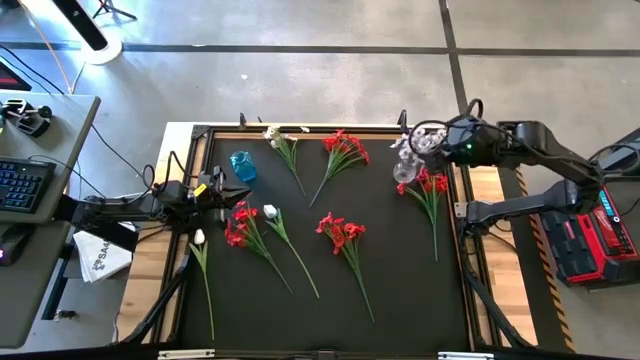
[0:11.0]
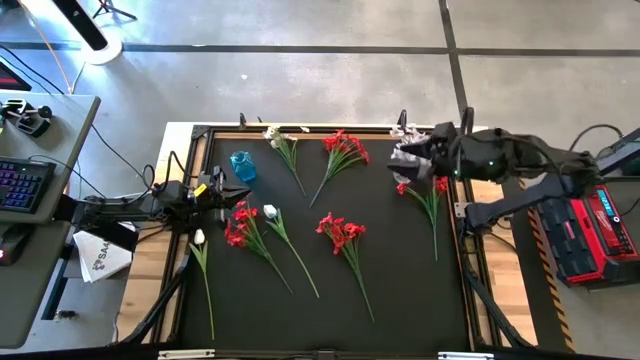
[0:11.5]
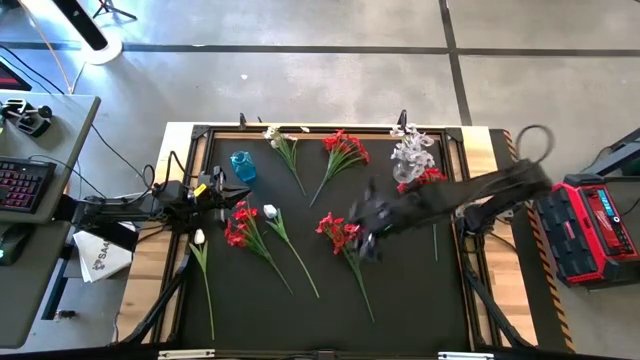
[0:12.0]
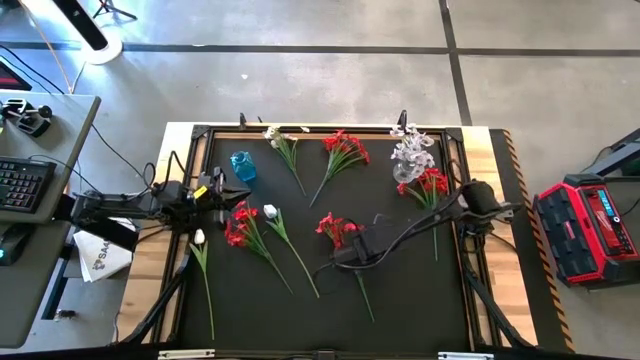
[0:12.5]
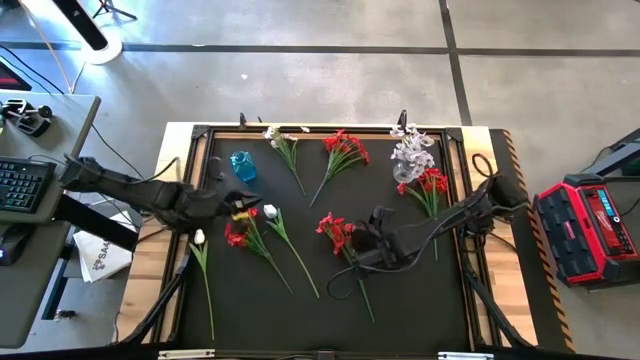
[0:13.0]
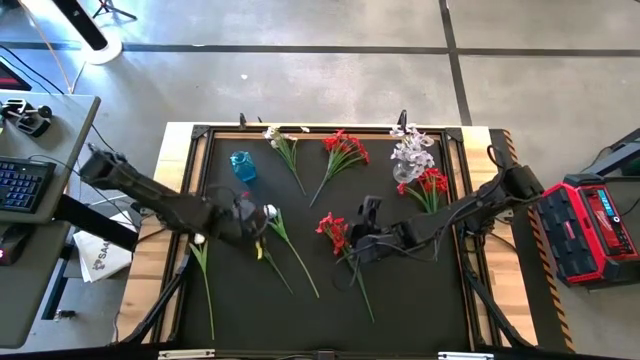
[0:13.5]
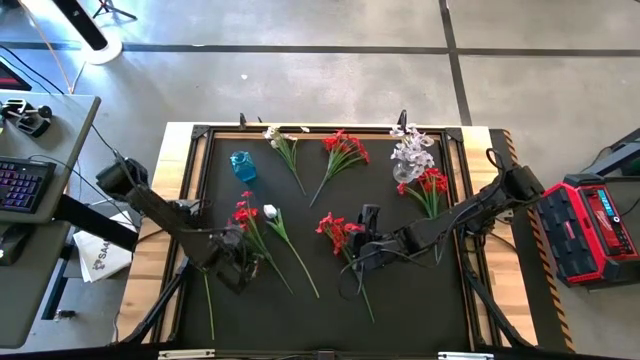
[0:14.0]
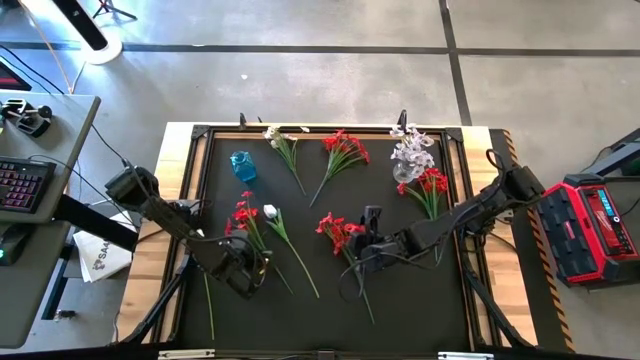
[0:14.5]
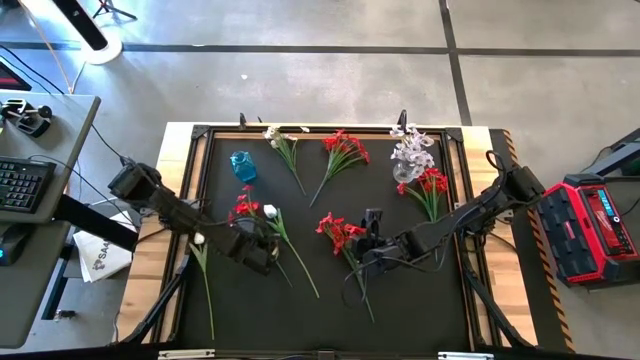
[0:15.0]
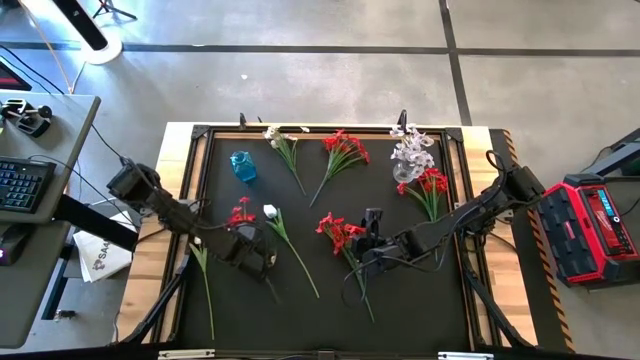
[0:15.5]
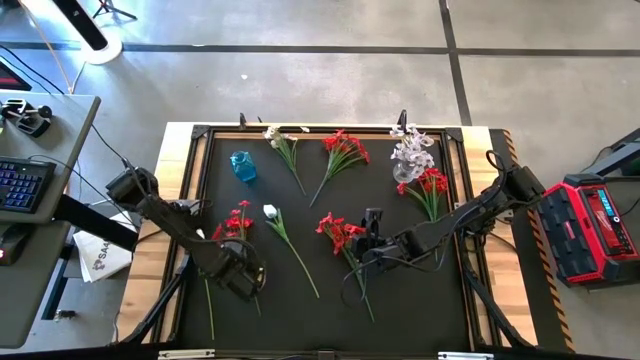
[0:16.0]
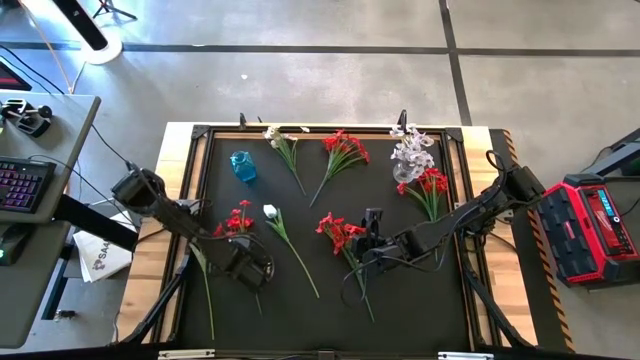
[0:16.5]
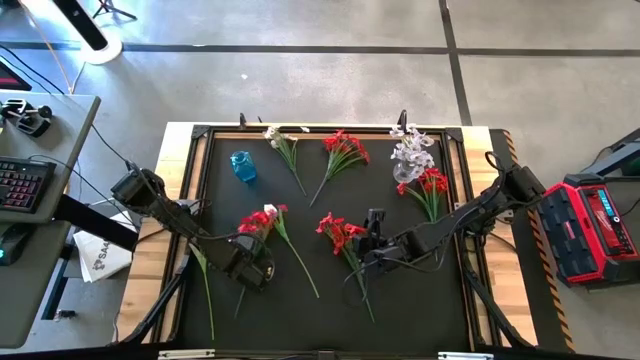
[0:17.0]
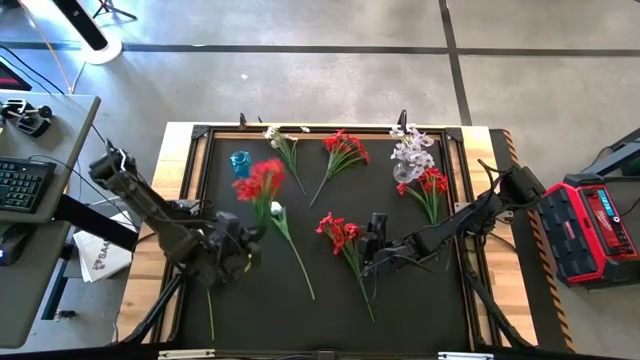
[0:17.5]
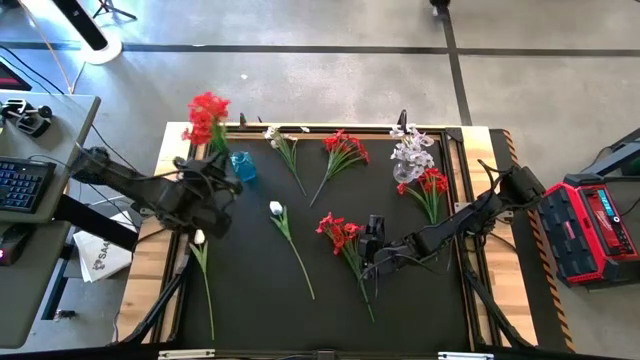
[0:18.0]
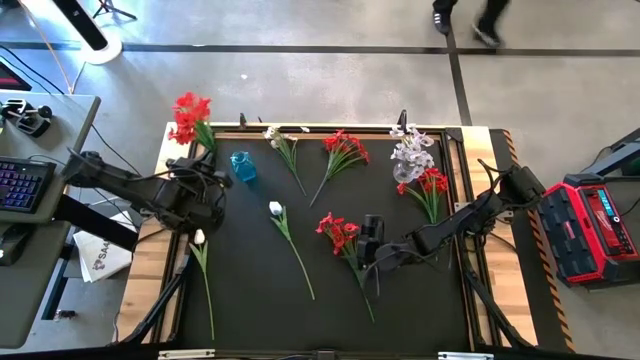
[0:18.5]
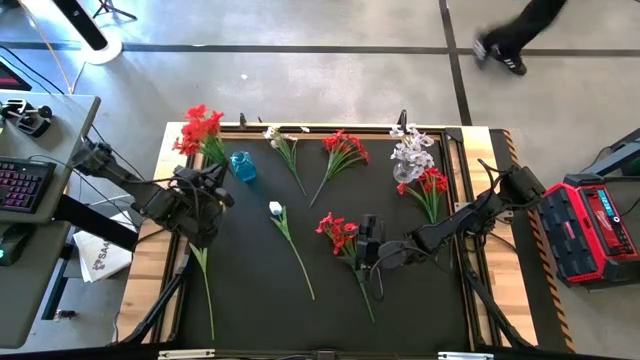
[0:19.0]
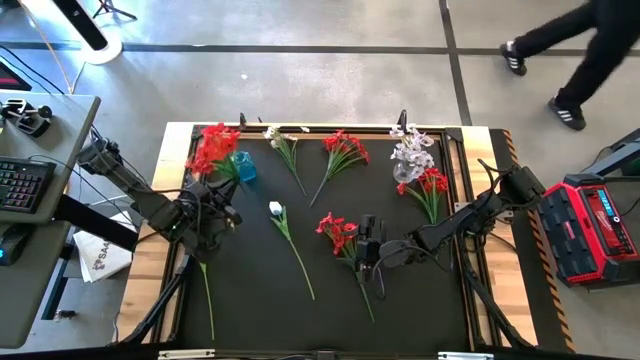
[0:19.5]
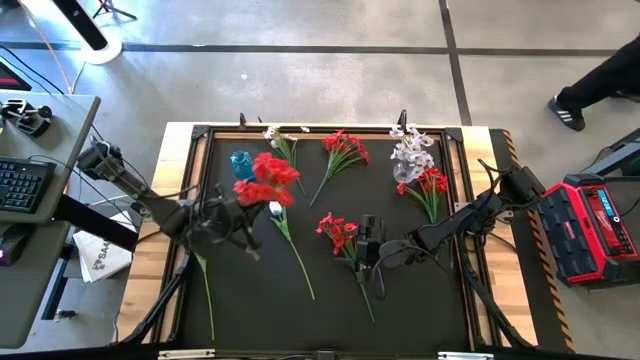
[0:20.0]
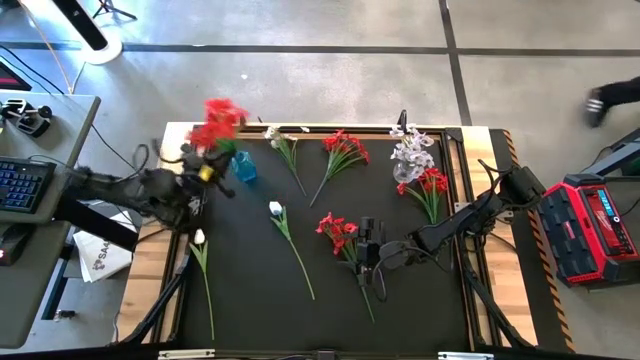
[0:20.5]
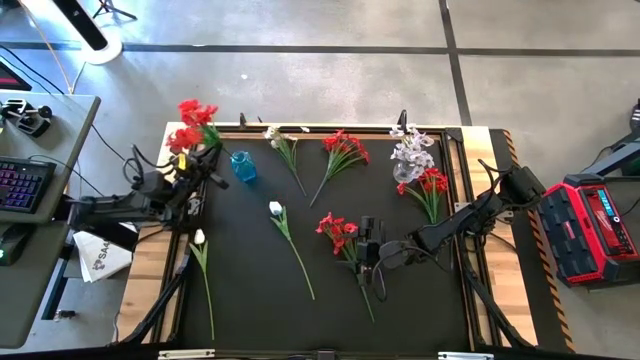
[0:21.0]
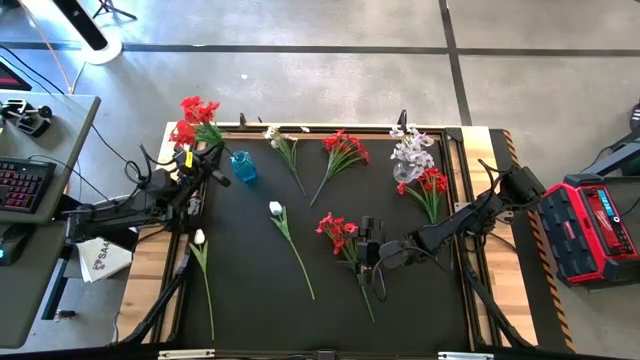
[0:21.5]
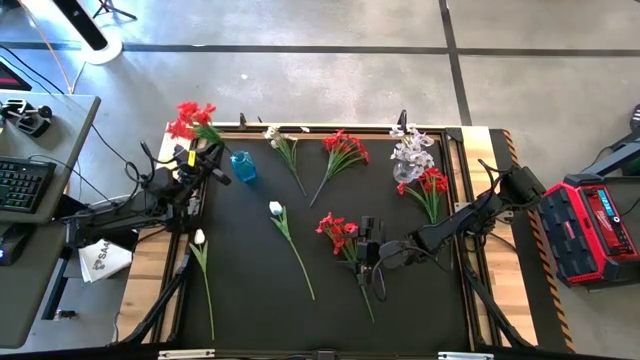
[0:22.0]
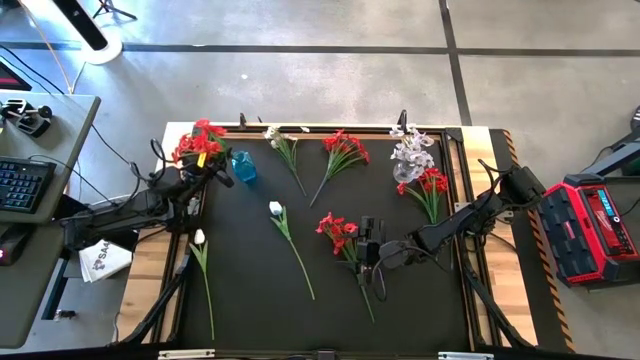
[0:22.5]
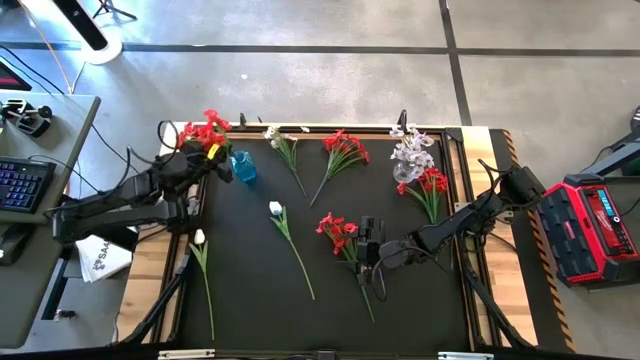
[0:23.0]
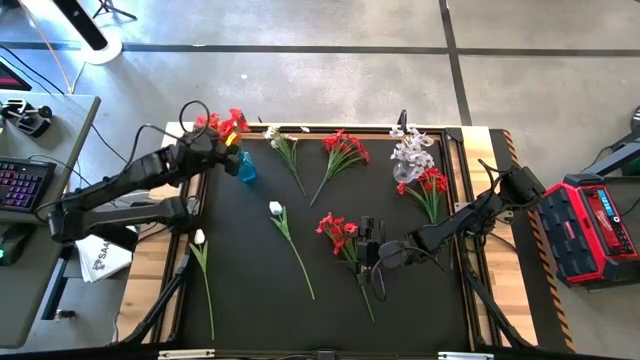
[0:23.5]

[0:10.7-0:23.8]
Task: Sort flowers into vase by color
Put the red flowers into the blue vase

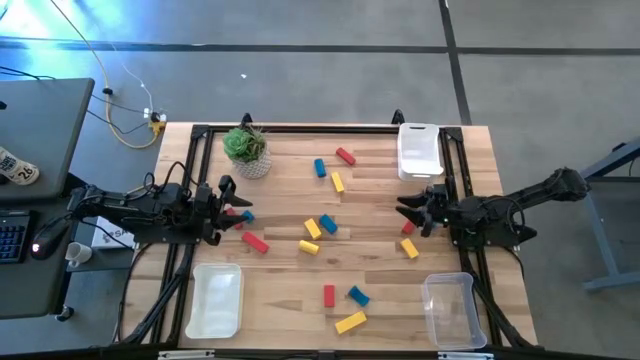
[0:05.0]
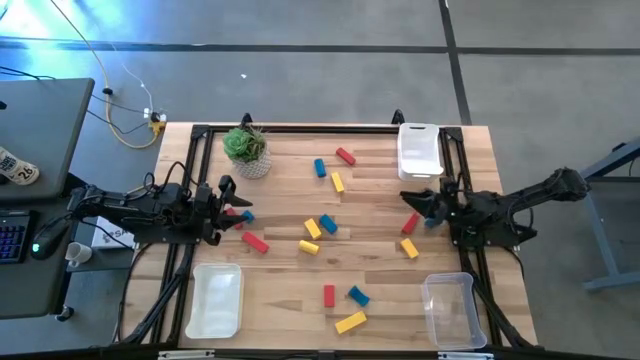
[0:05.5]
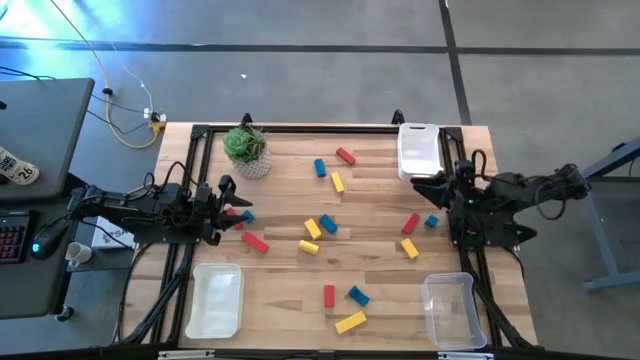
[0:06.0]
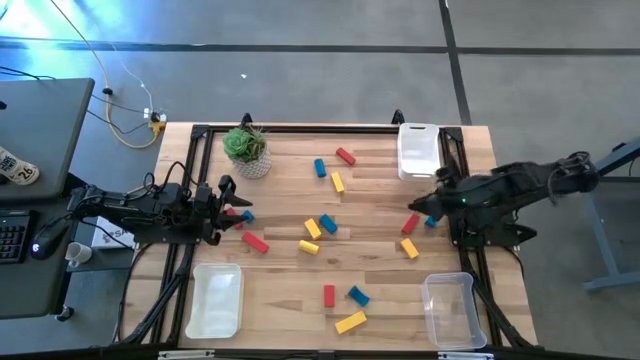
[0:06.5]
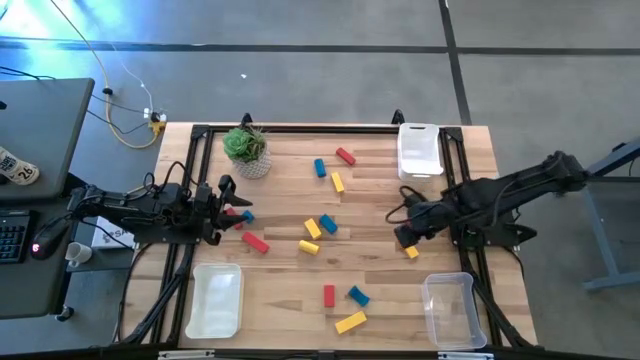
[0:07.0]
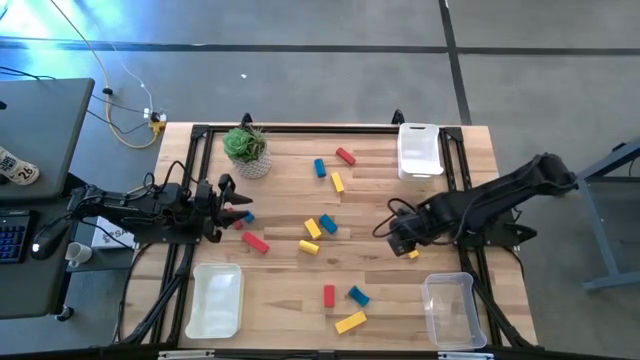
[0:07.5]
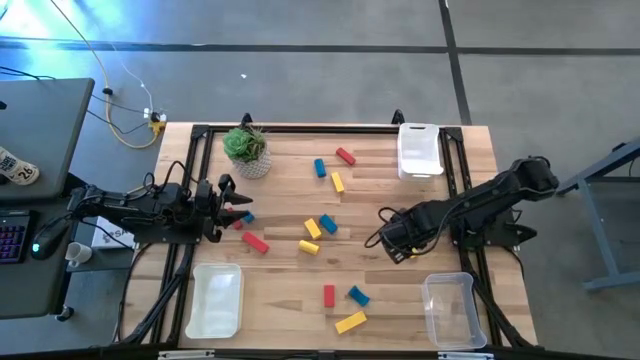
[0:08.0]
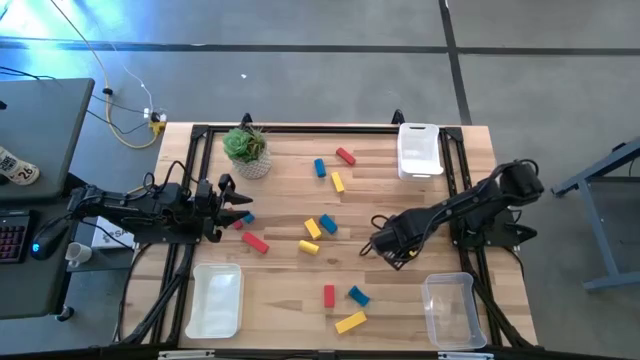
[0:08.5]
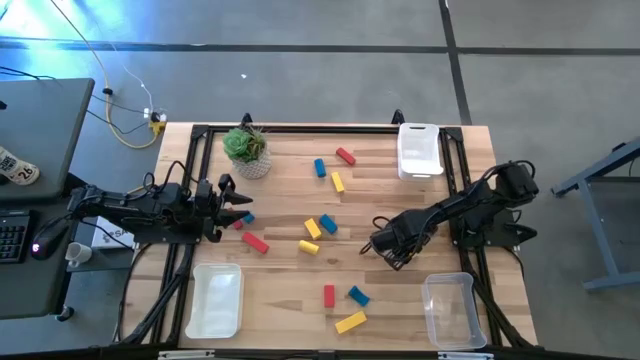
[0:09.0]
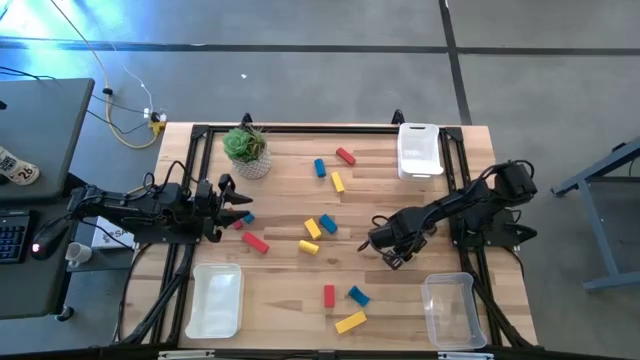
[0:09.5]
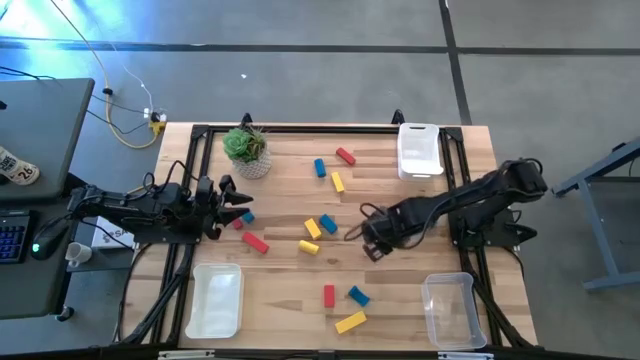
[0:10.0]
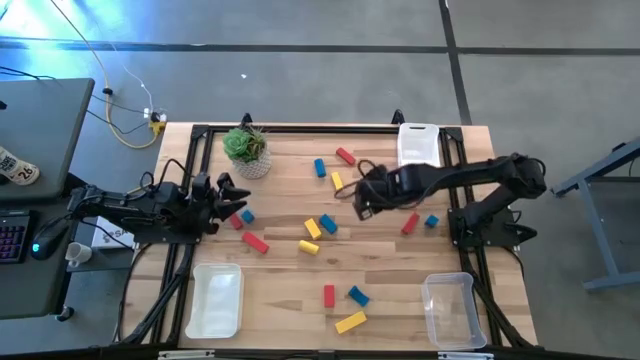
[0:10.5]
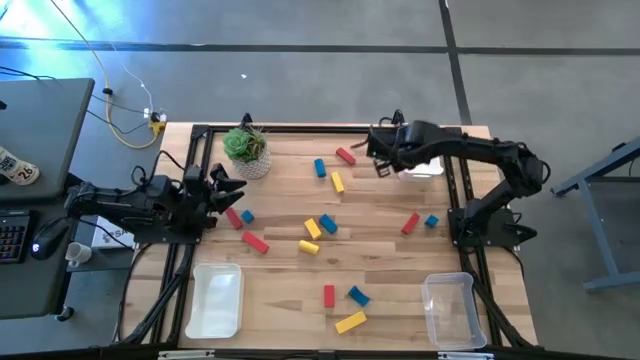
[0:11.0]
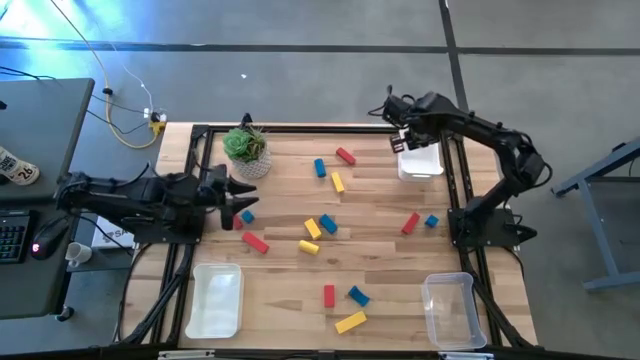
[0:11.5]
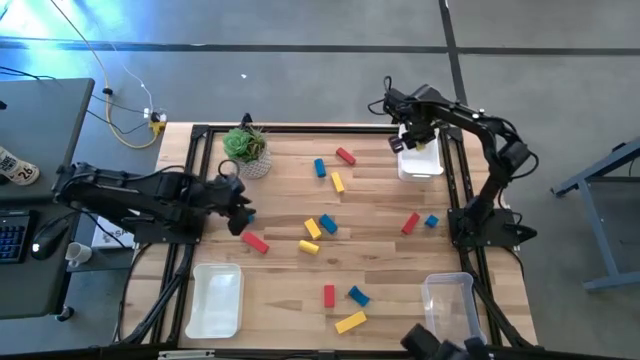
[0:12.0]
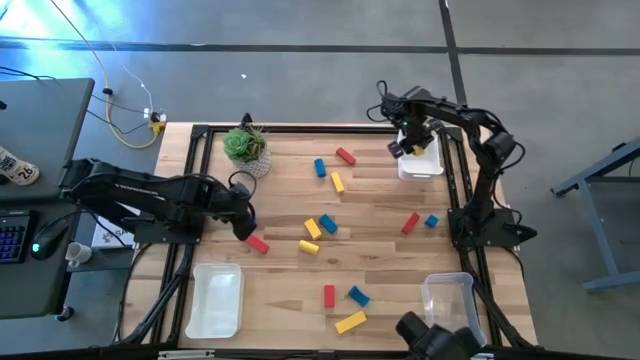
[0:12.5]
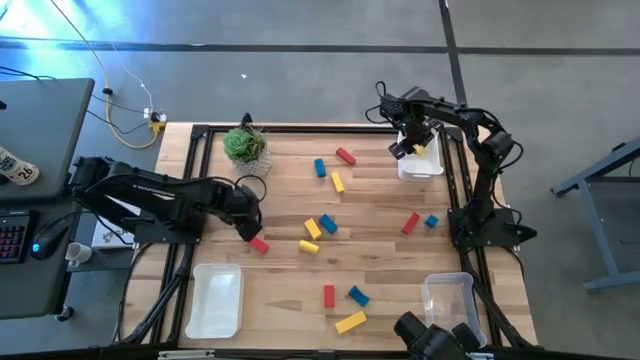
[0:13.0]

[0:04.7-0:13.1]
Task: Sort & place blocks by color
Put the yellow block into the top white bin
